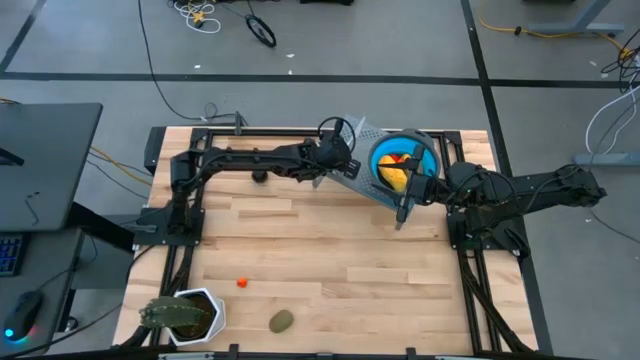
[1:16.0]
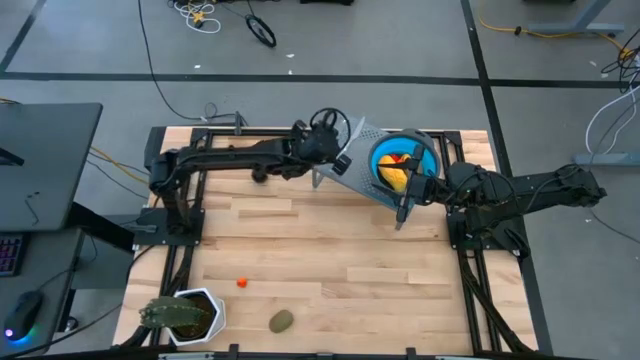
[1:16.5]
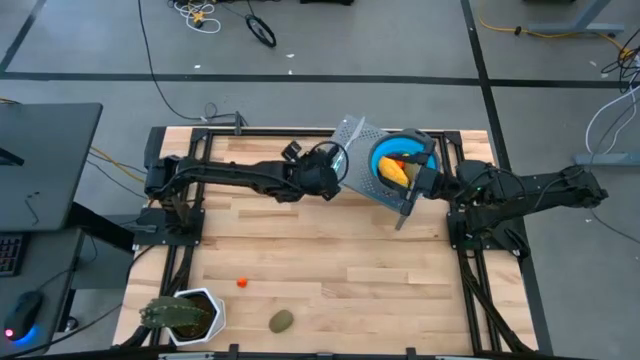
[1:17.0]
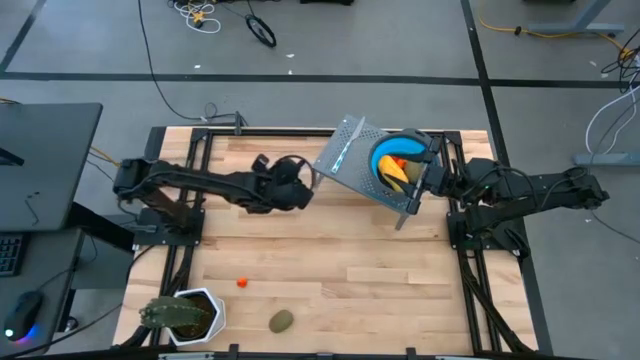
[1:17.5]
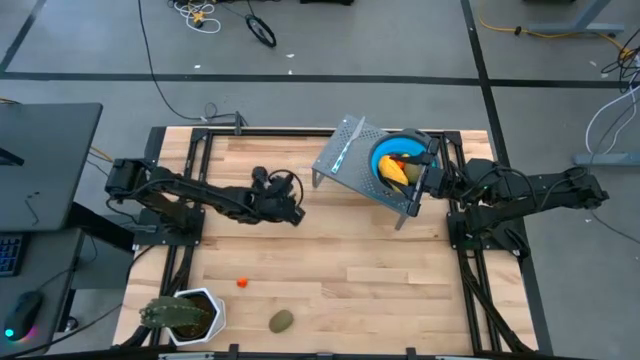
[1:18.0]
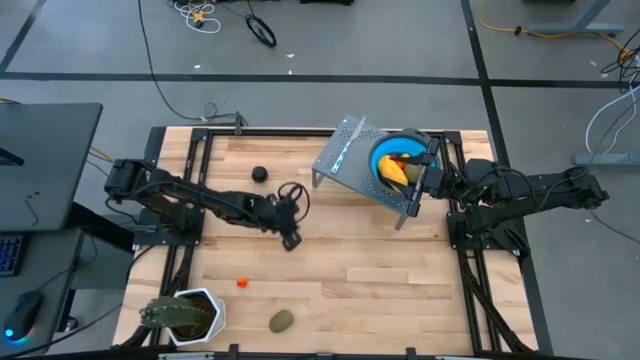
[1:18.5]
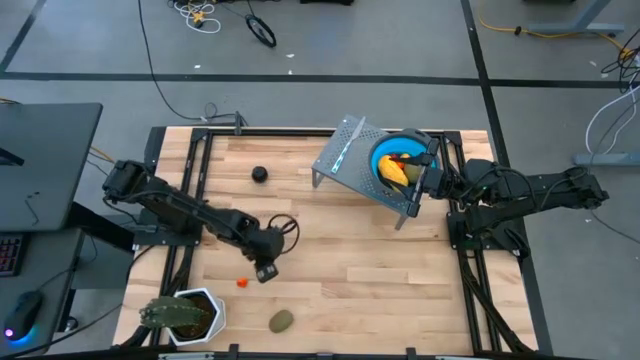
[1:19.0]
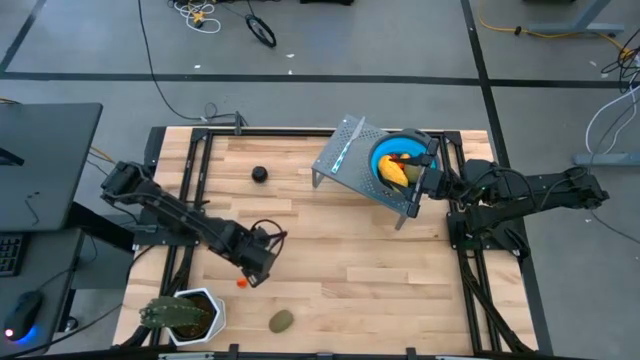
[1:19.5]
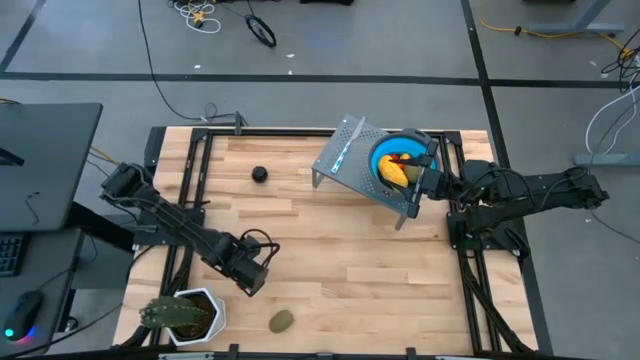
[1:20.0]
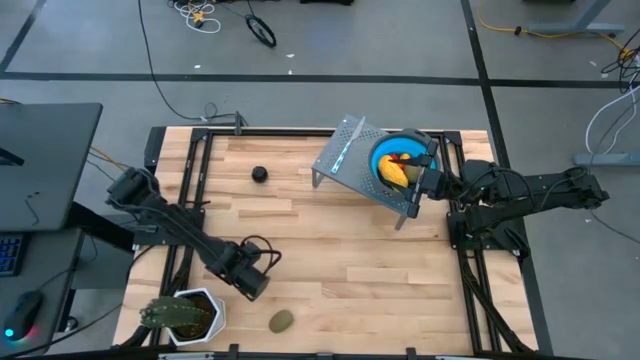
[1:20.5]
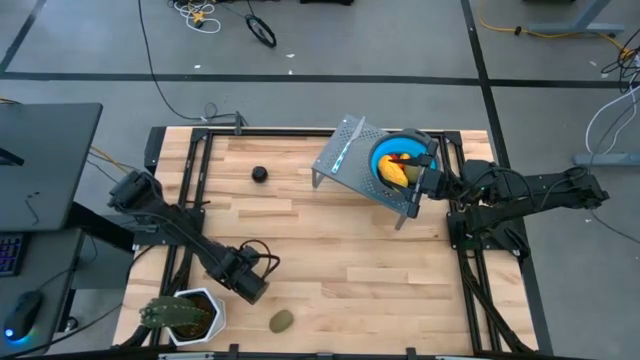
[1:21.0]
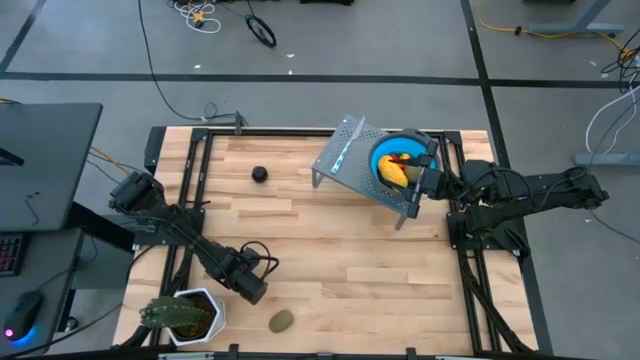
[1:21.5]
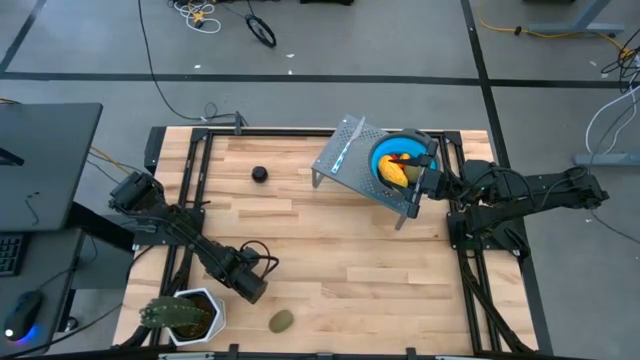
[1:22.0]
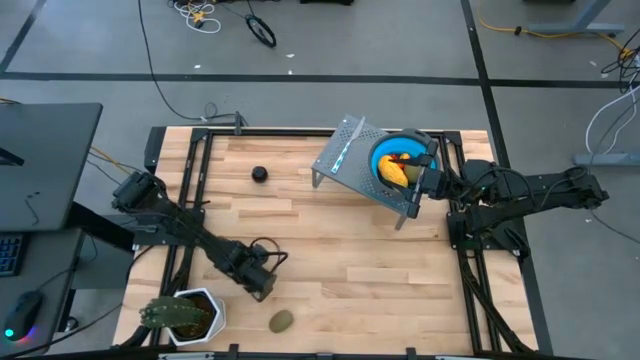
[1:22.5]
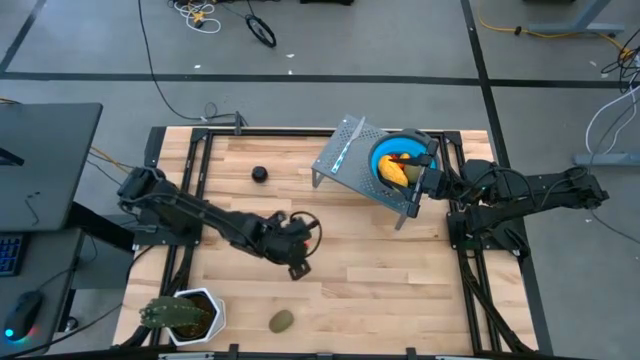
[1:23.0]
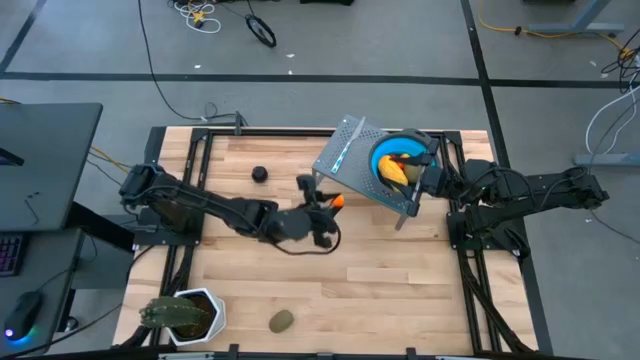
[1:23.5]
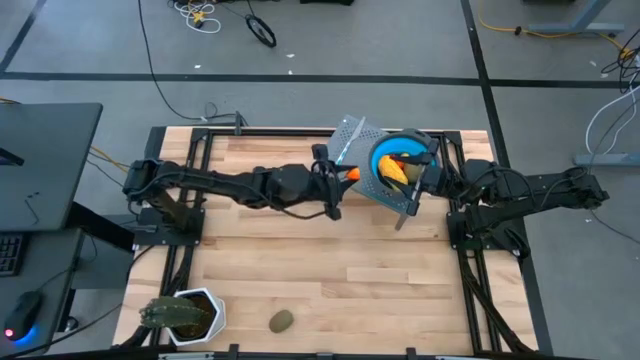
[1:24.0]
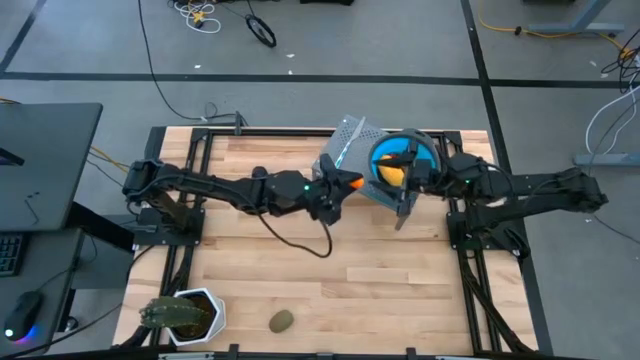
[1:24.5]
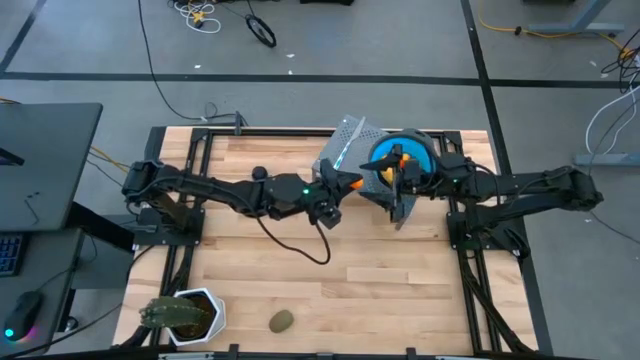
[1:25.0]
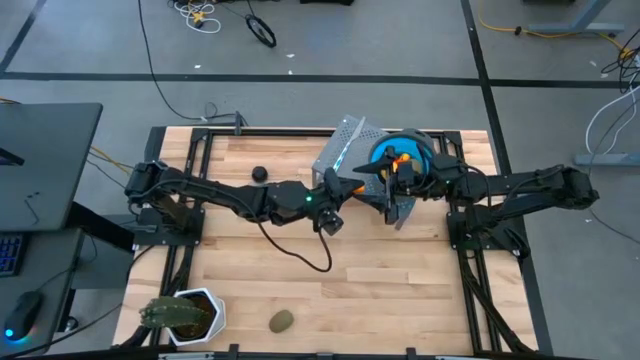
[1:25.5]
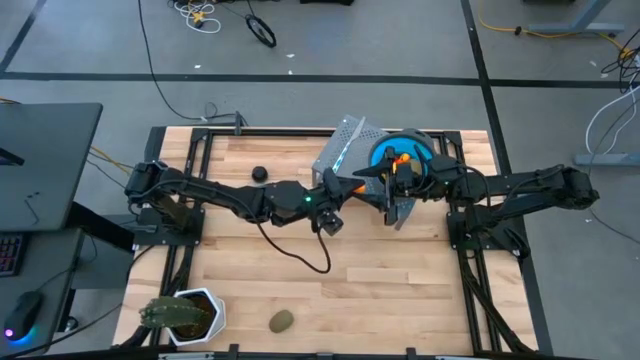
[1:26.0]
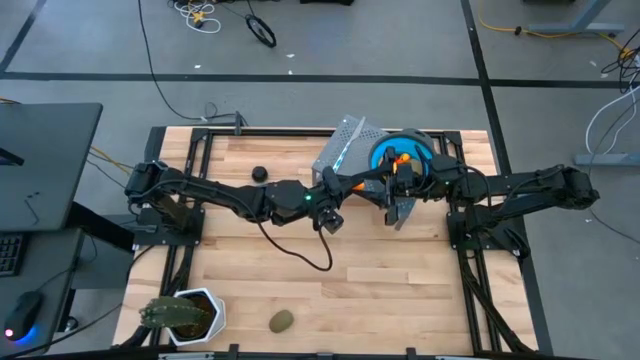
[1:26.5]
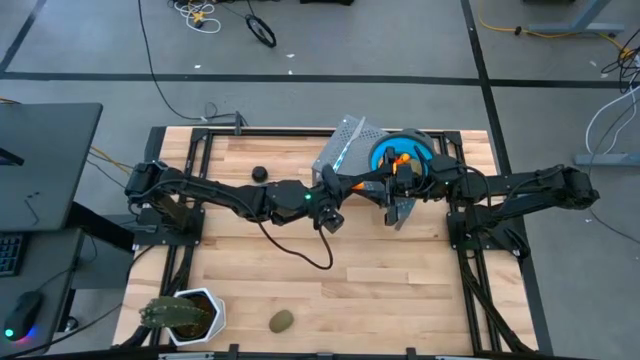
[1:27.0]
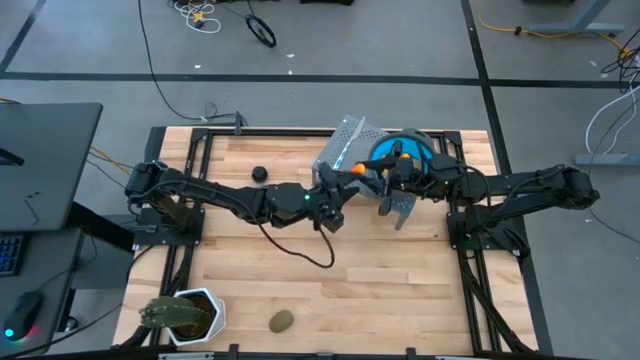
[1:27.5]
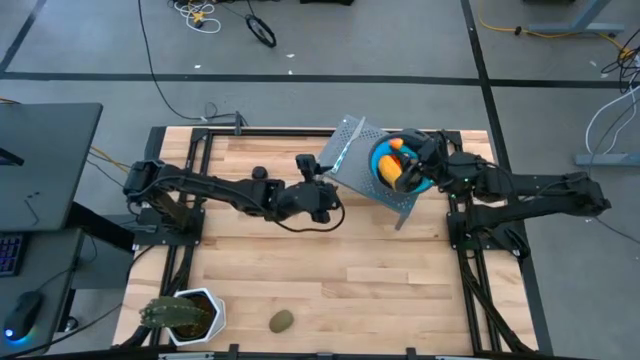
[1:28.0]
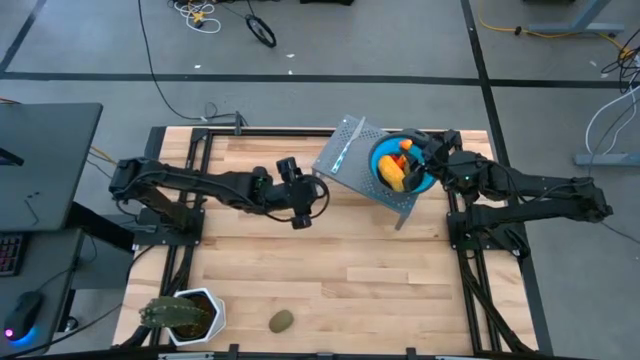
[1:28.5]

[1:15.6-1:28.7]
Task: Pick & Place Fruit
Put the yellow peach in the blue strainer bowl on the shelf

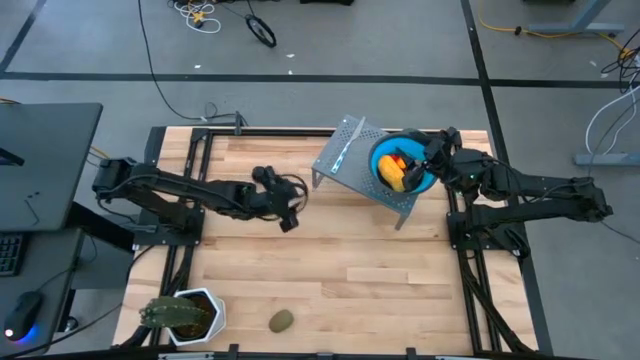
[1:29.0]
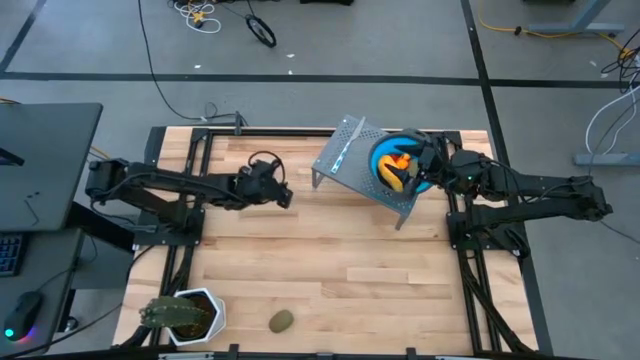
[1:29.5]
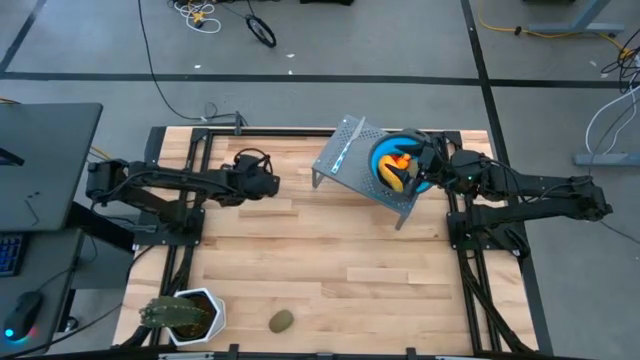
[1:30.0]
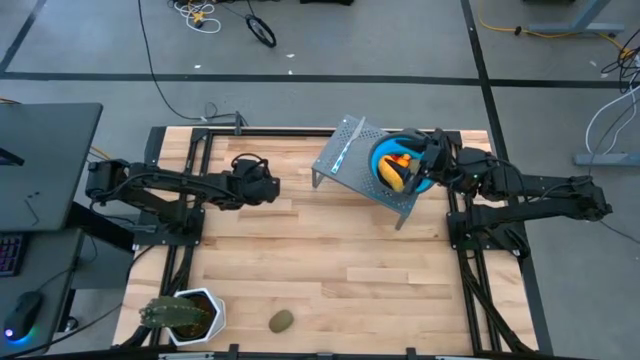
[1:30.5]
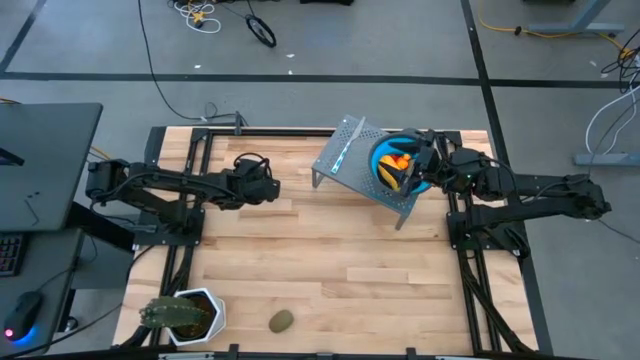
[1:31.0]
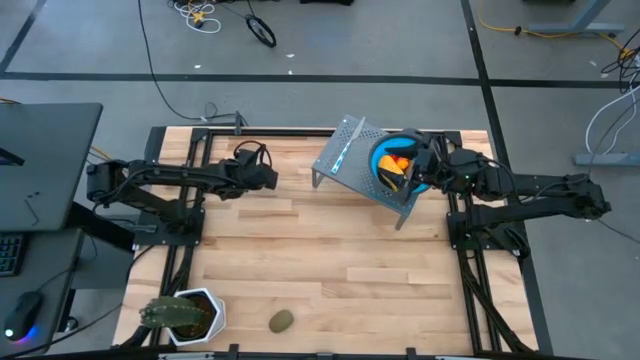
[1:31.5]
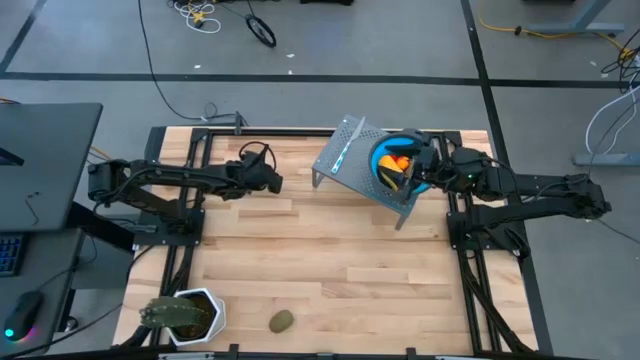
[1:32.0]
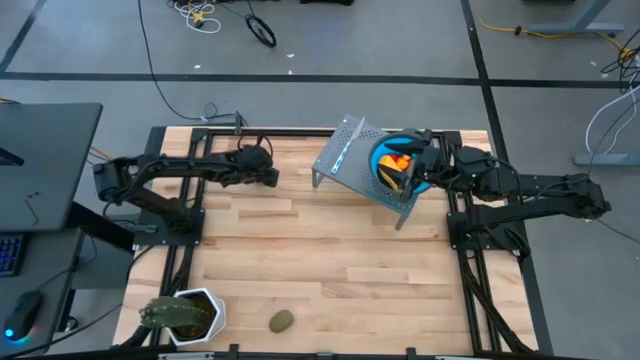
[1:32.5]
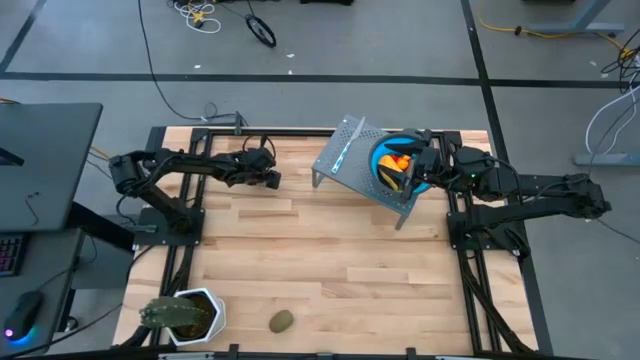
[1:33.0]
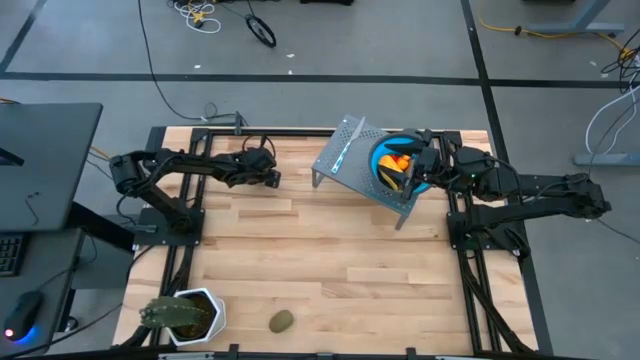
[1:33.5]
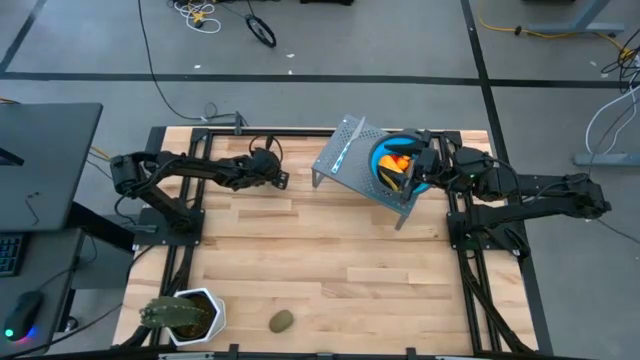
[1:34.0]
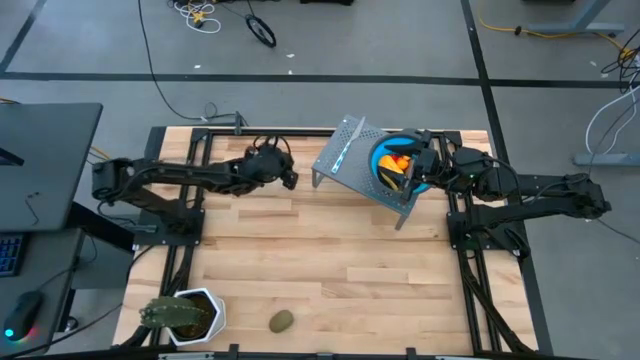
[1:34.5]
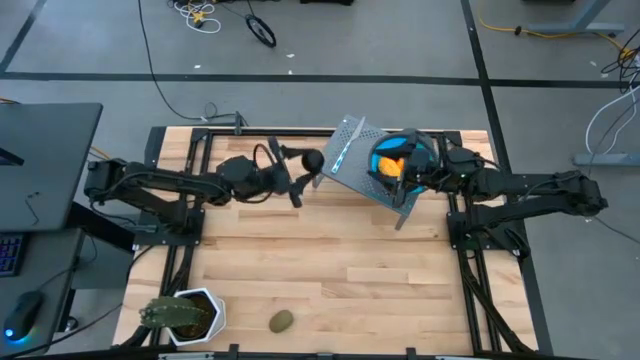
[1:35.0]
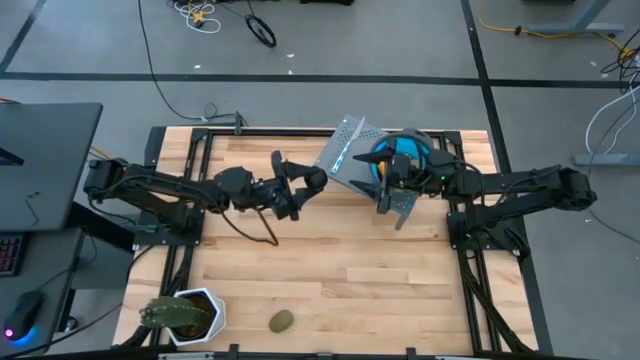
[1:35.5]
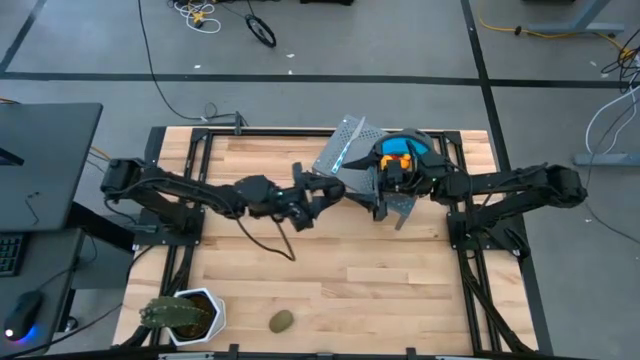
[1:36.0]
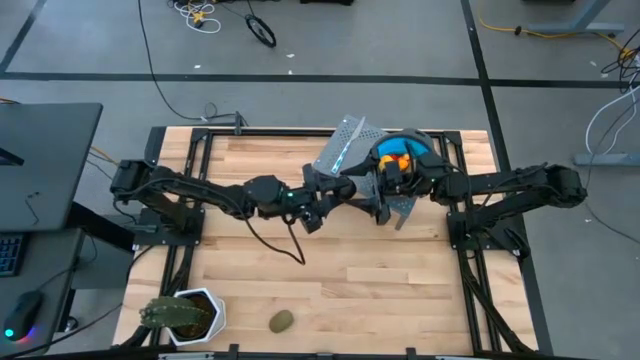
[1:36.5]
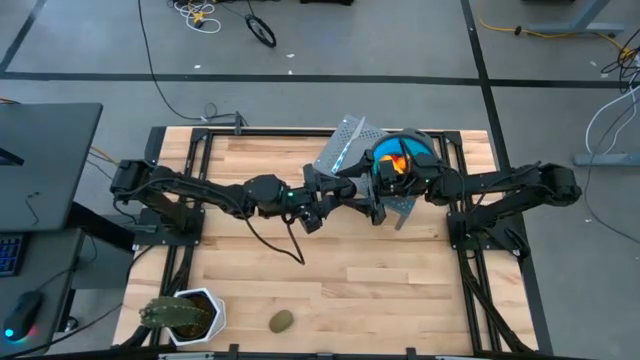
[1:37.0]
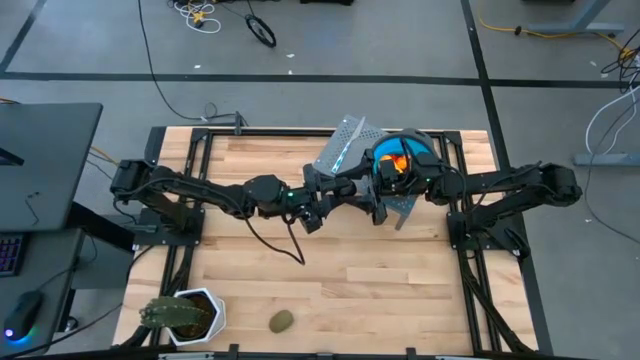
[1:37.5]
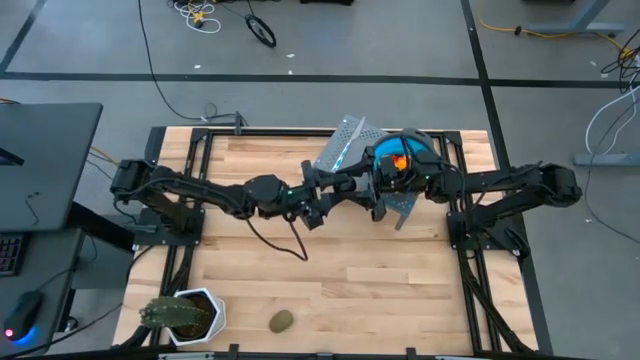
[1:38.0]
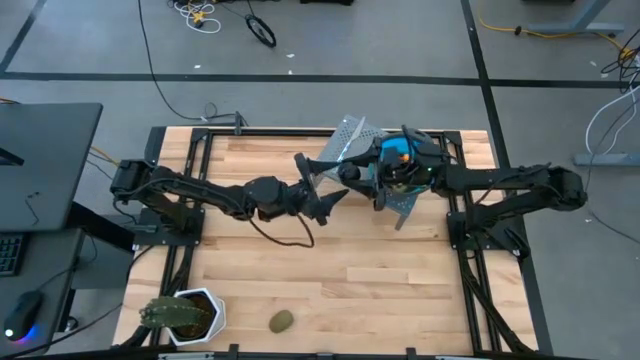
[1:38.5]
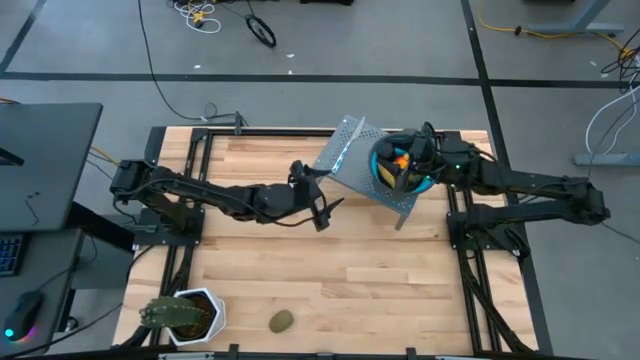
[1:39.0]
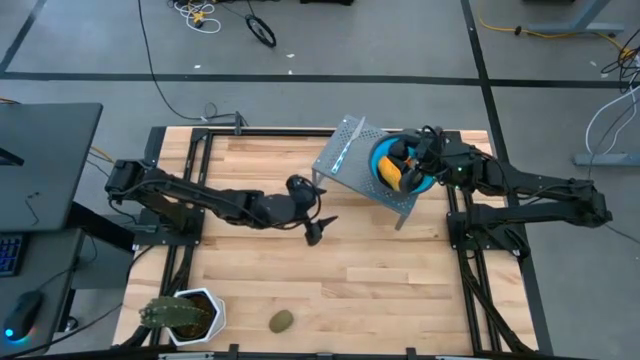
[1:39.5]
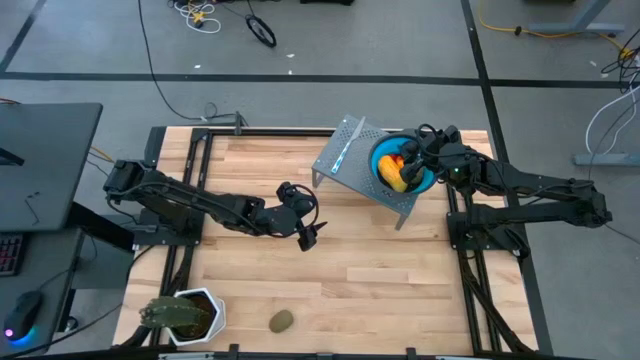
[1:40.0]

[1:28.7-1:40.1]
Put the black plum in the blue strainer bowl on the shelf
